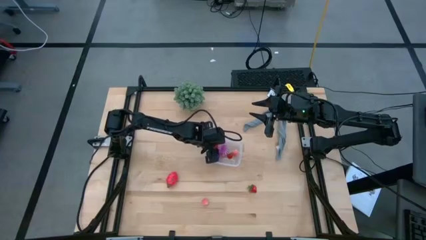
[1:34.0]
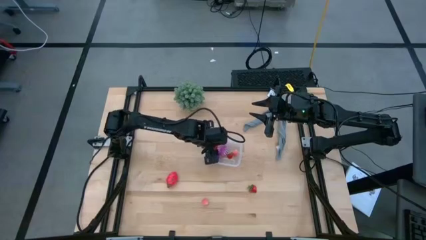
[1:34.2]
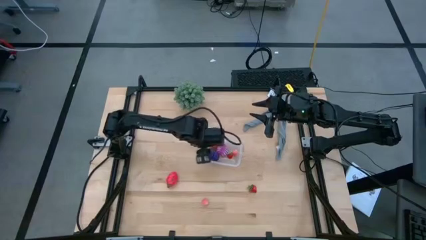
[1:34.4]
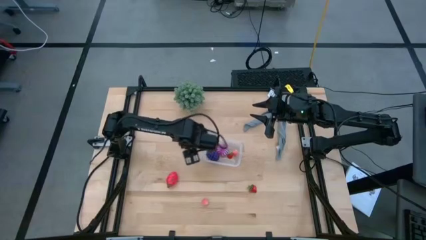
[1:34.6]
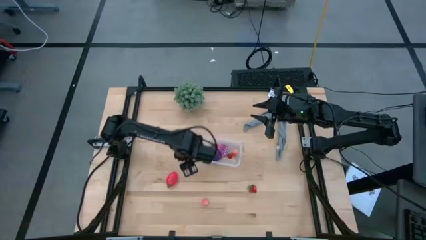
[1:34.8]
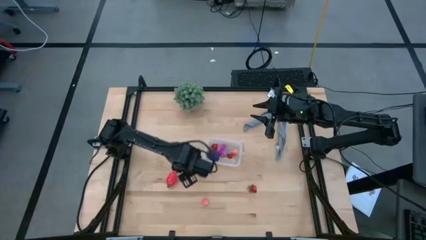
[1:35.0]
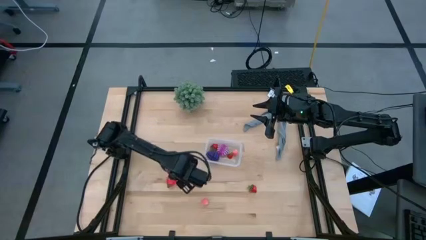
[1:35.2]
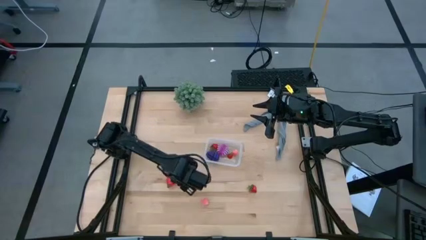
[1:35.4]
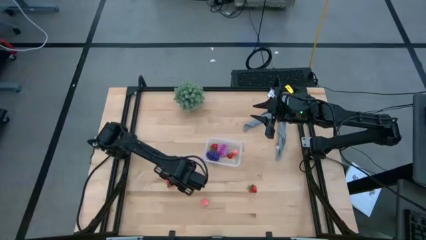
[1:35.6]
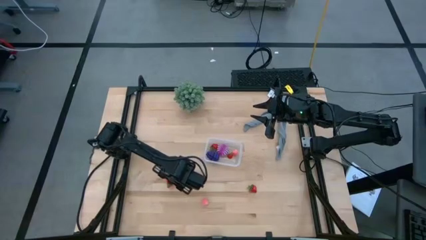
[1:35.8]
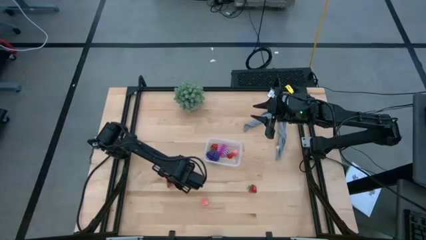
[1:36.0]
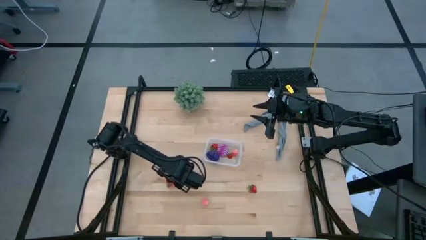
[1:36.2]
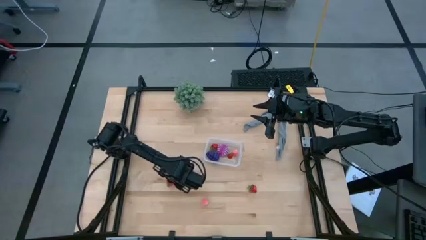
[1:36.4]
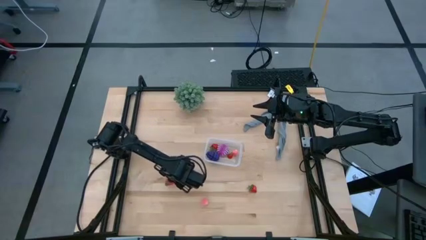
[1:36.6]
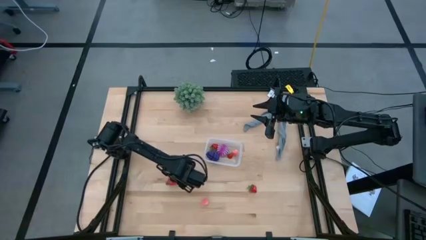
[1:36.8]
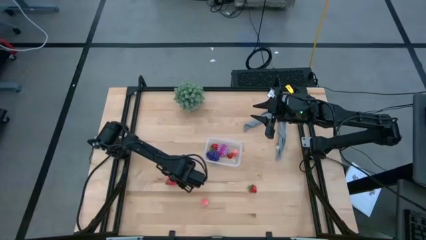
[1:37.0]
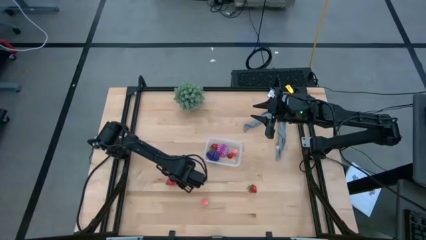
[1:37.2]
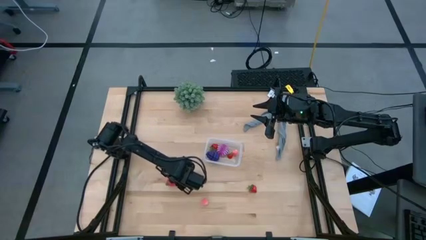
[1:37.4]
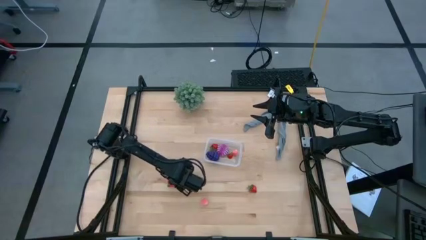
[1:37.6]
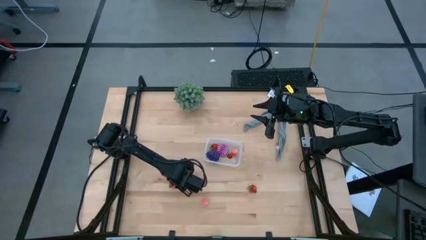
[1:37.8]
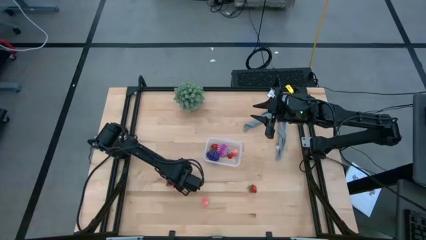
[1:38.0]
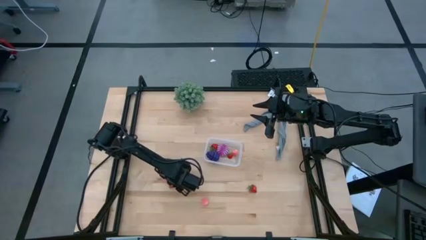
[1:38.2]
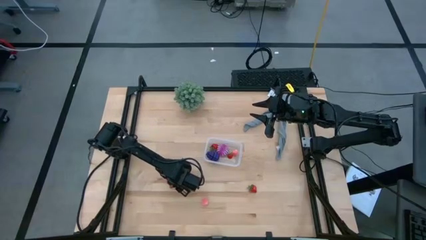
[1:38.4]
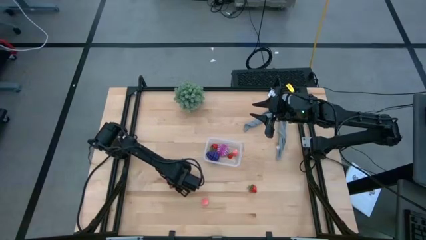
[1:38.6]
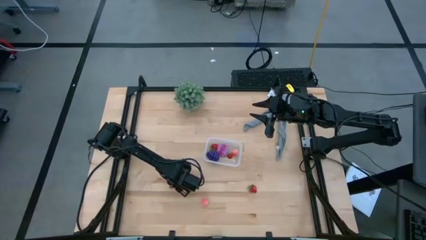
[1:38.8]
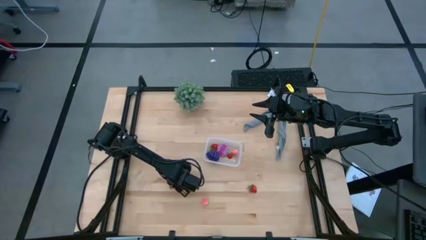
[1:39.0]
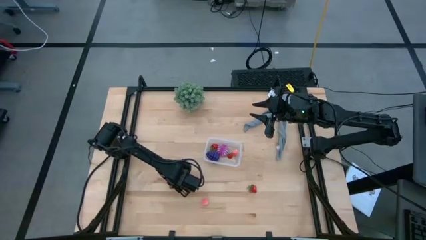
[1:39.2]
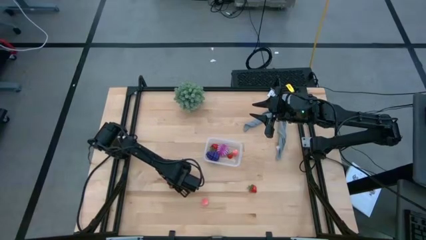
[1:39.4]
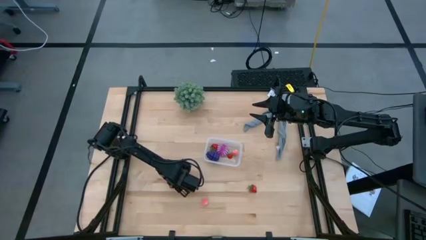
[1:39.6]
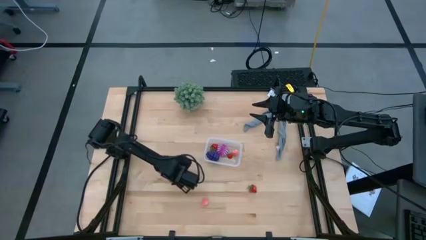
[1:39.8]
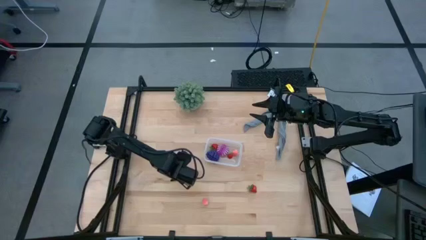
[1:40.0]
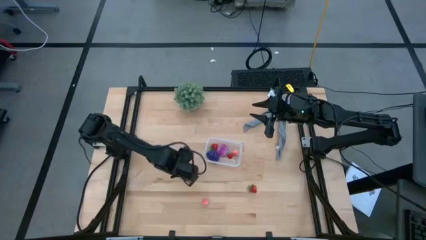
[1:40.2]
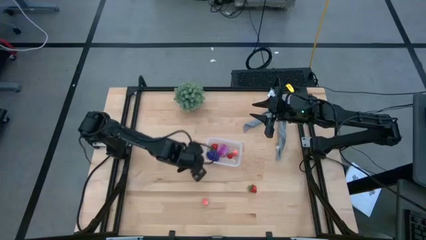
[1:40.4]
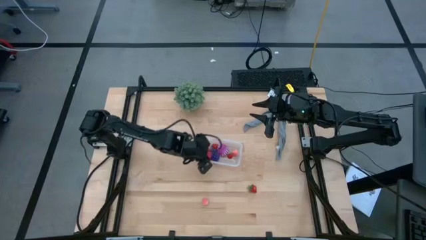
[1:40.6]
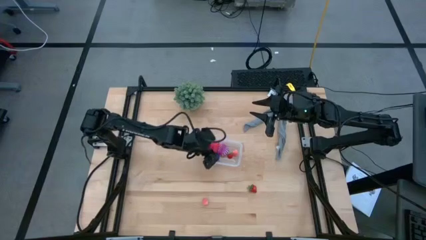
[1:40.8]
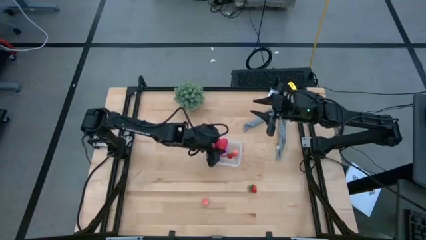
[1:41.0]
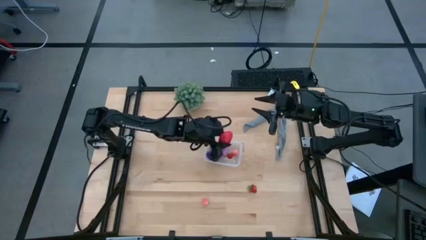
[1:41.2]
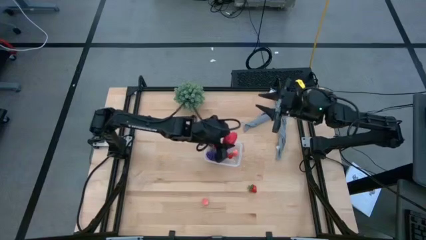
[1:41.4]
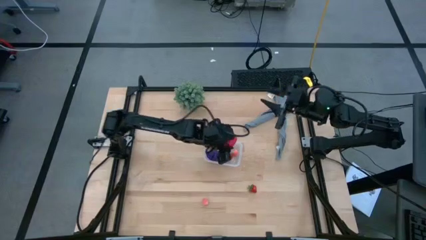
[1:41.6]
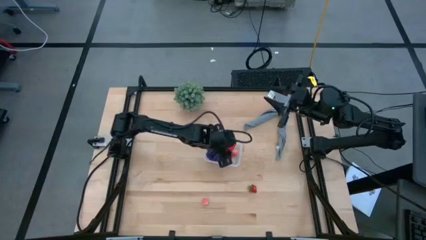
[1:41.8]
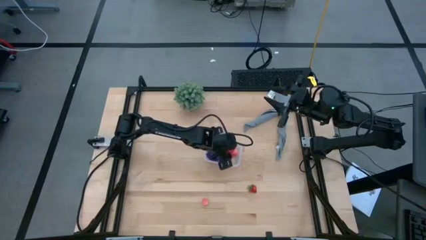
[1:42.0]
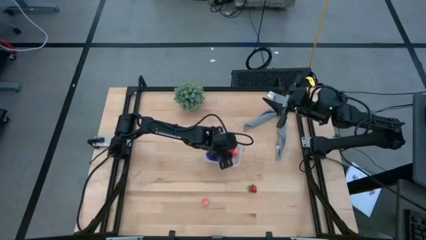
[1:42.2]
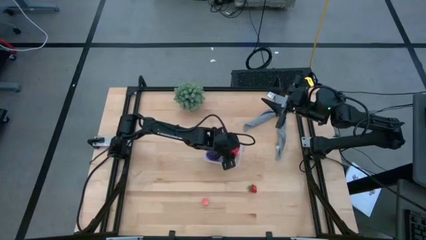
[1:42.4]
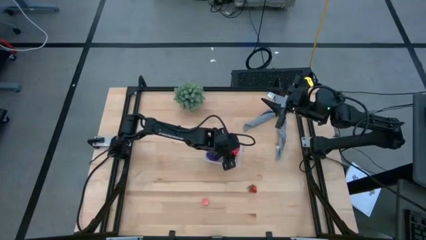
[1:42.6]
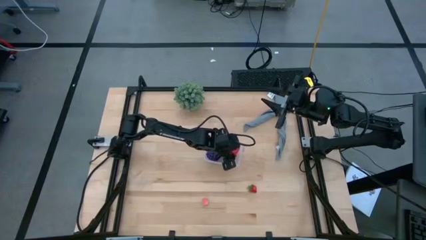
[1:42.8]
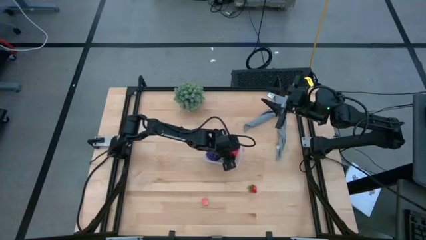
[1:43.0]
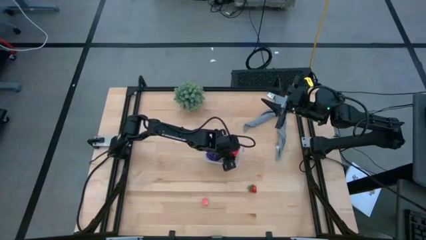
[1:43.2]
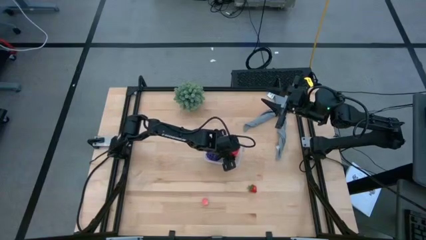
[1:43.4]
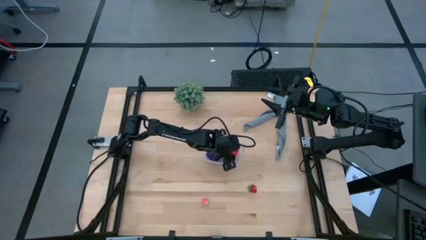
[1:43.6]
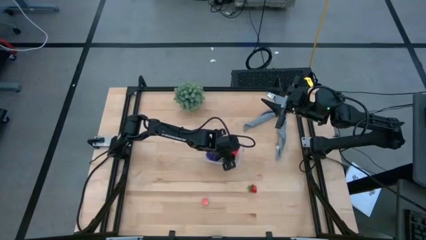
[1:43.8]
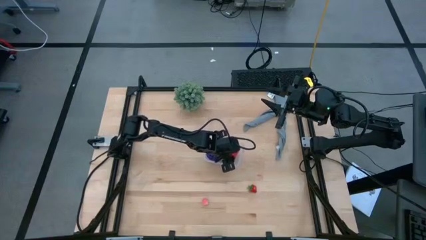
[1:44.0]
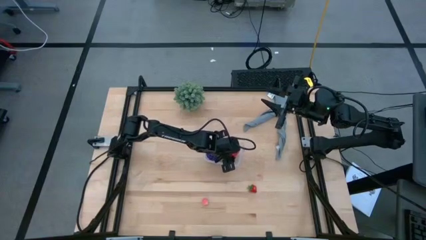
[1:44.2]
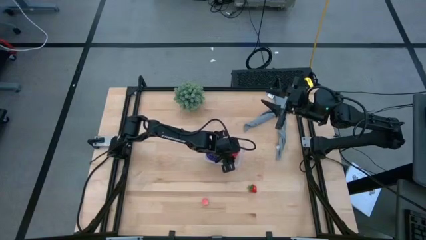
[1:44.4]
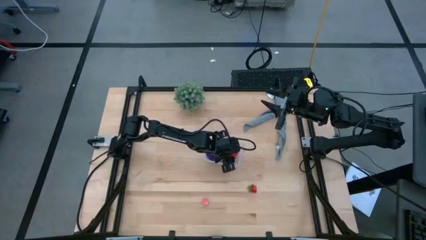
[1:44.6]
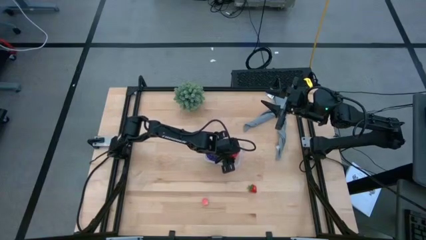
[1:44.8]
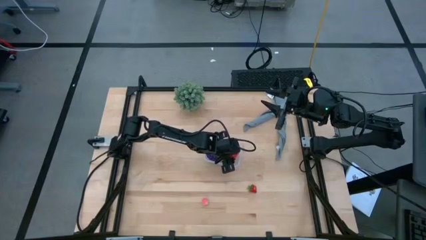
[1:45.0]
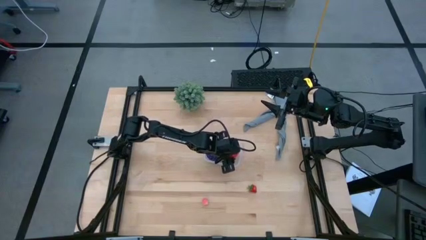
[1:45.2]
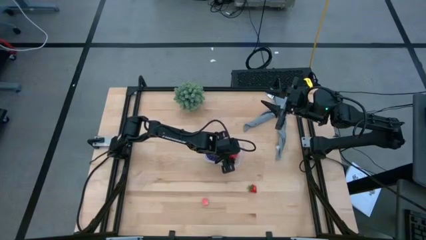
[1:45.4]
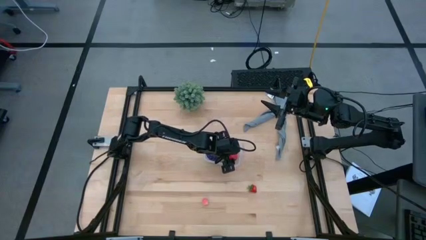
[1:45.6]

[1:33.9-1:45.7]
Task: Pick and placing Produce into tupperware
Put the dragon fruit into the transparent container

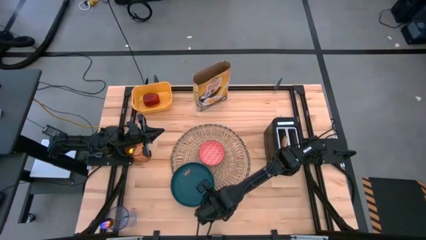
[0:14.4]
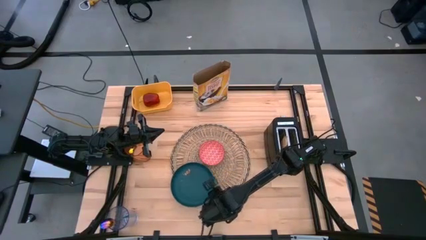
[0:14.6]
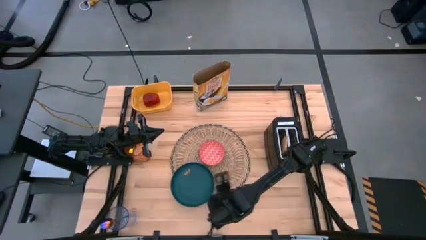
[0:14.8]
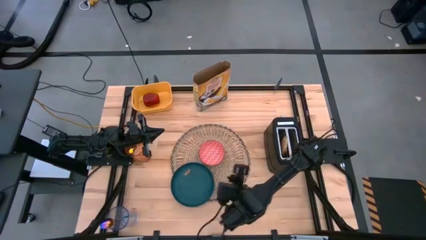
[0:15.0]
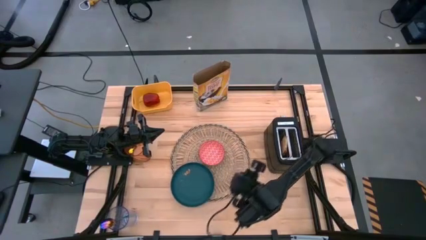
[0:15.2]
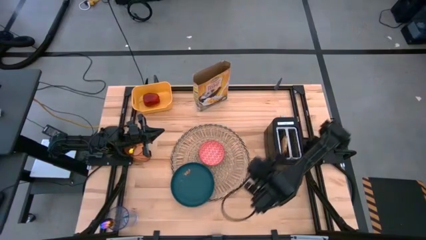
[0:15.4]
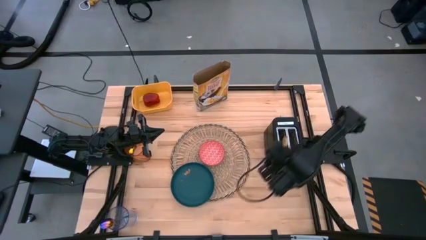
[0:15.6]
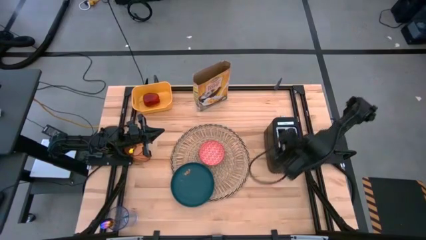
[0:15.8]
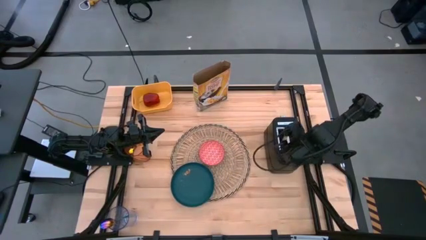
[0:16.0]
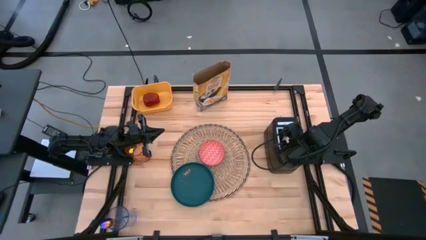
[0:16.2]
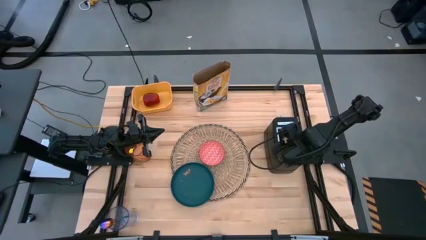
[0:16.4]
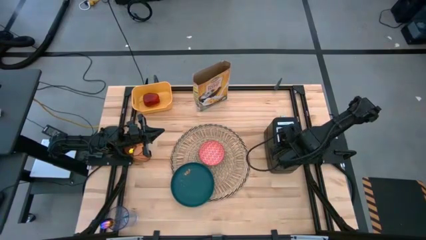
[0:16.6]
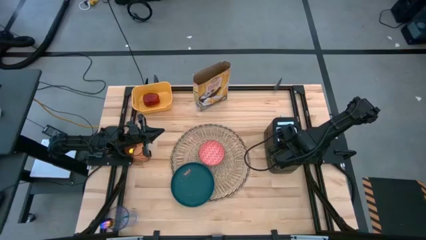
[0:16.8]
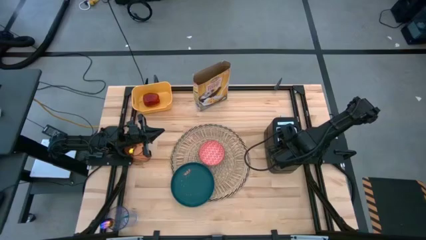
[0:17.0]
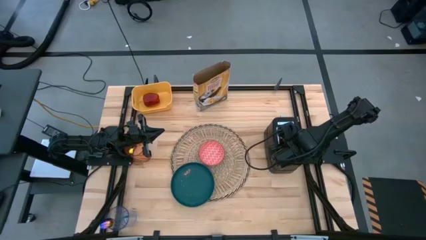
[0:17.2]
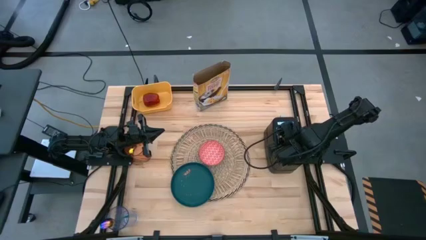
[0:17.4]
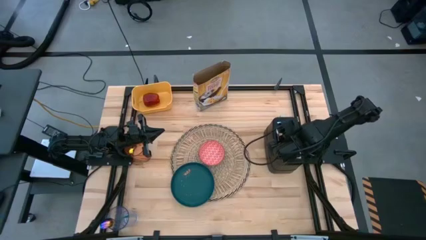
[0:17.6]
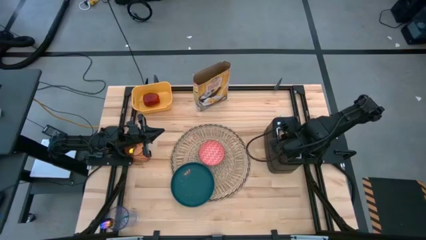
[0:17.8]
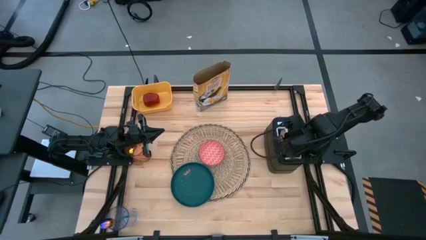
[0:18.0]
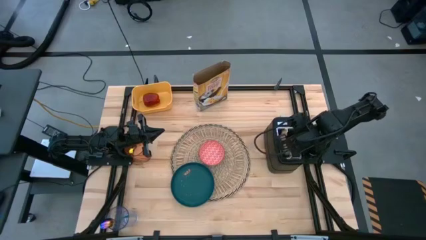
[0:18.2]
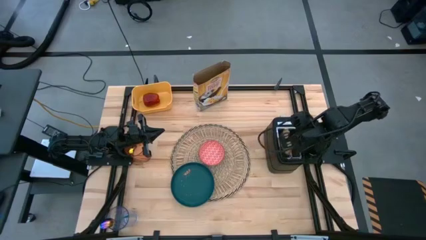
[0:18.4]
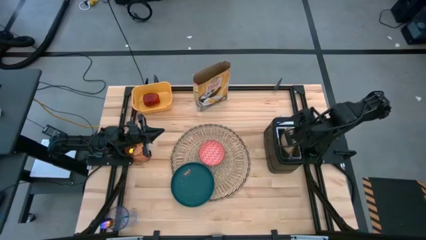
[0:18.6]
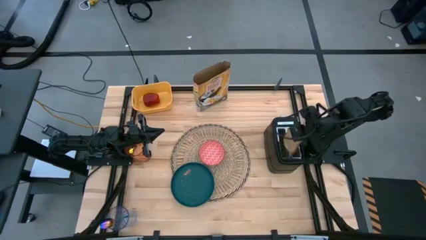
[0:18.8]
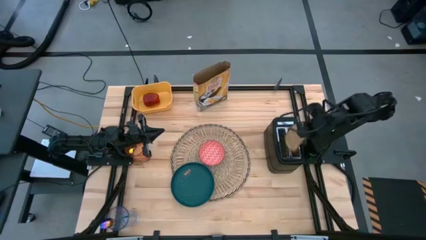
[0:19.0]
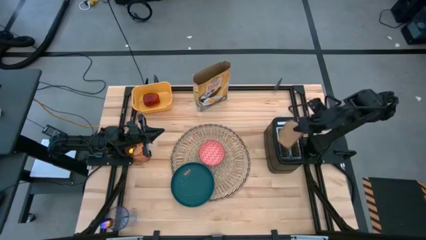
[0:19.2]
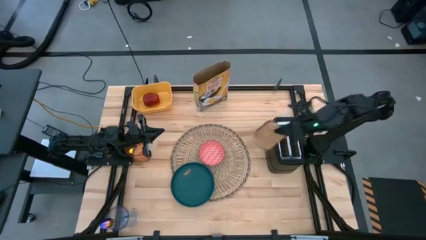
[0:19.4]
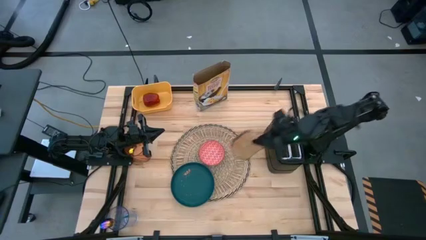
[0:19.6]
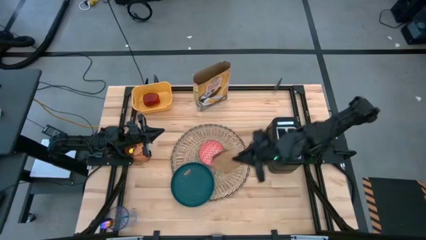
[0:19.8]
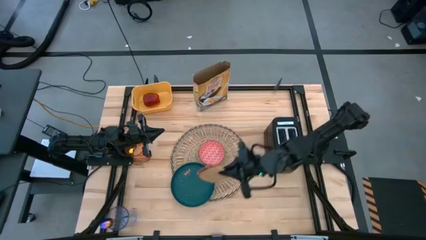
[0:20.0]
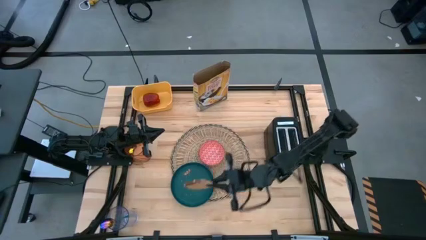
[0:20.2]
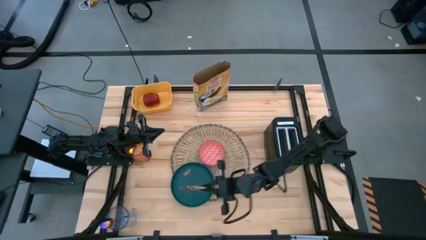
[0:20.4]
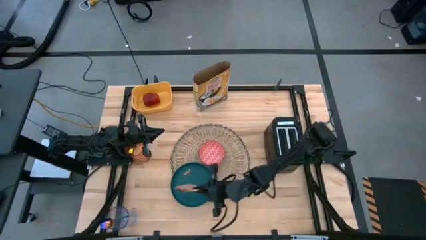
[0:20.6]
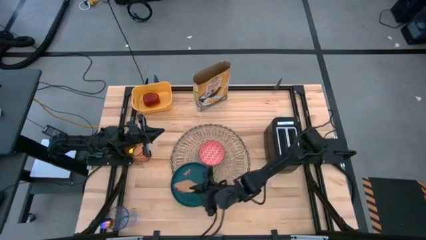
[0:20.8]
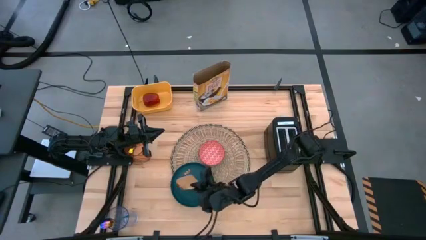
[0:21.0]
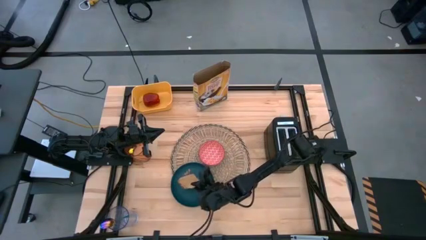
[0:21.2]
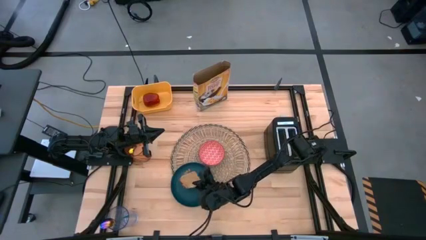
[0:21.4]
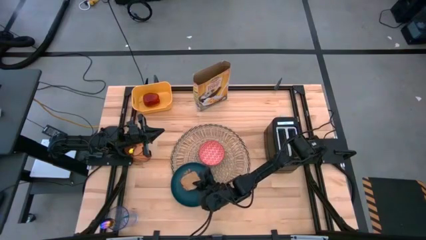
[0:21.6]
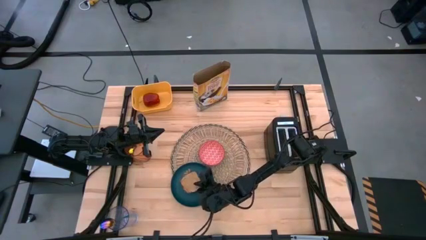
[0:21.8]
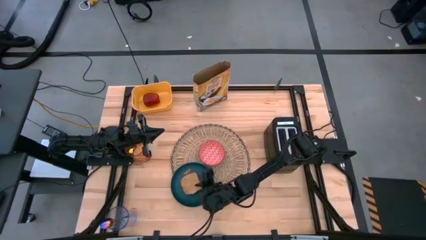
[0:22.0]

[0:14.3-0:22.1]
Task: Arrange a breakfast setting
Put the toasted bread on the blue plate
